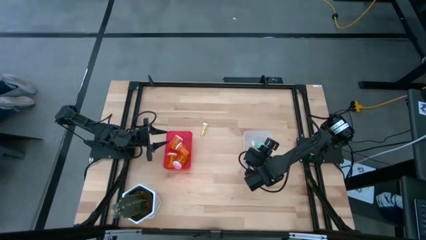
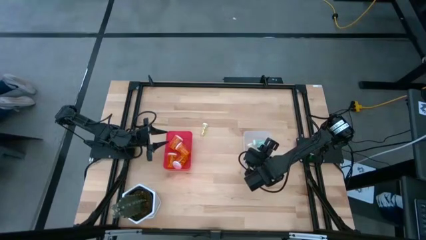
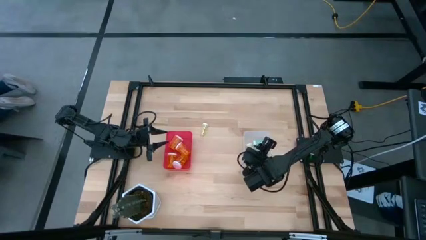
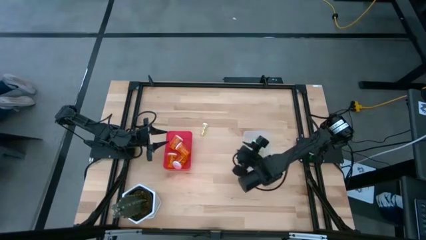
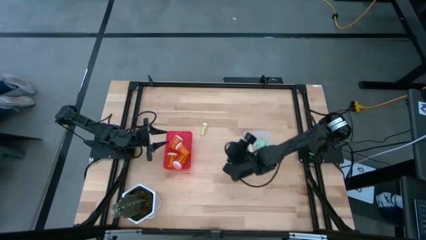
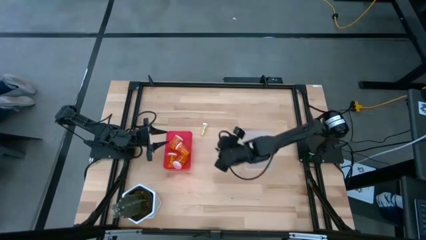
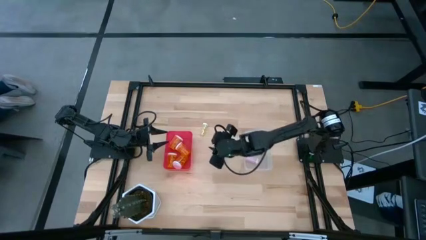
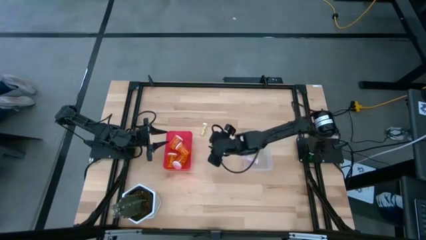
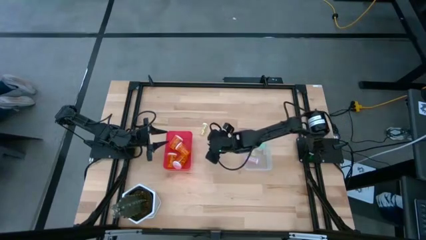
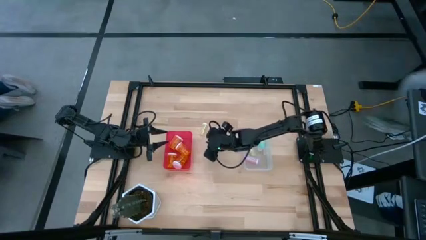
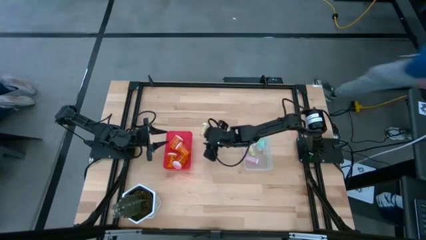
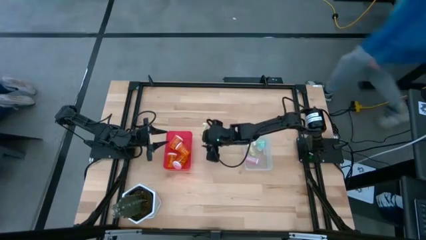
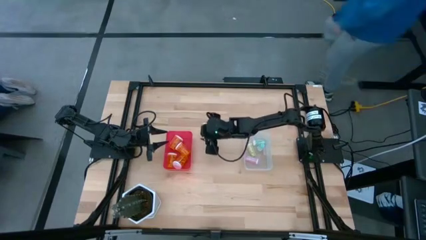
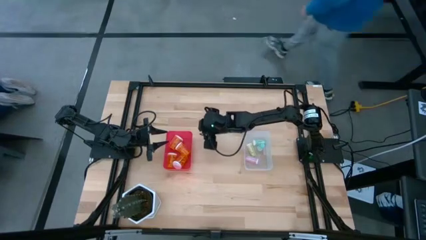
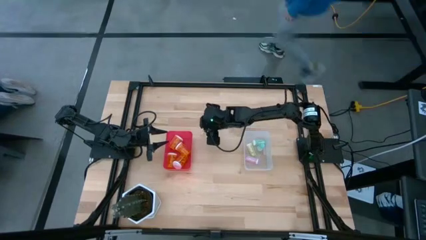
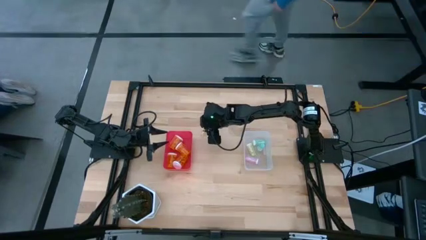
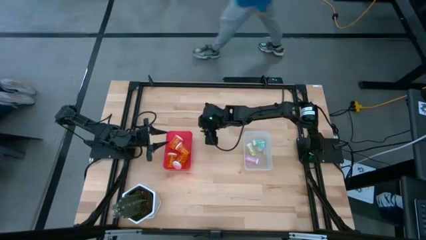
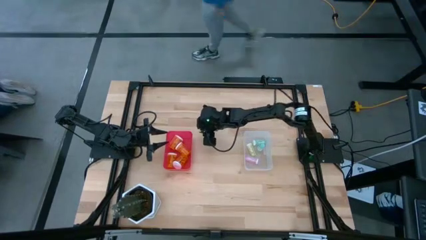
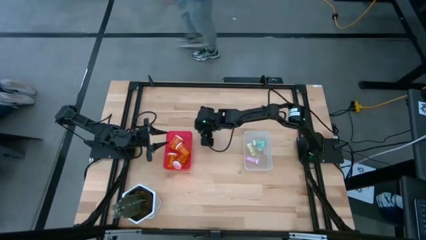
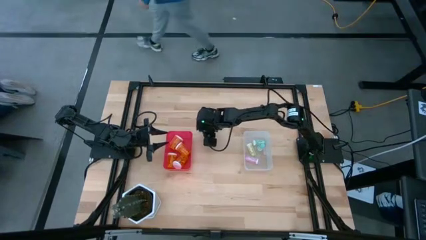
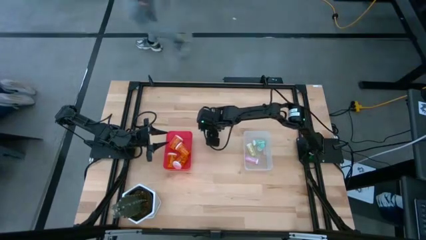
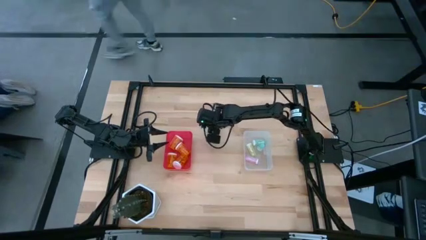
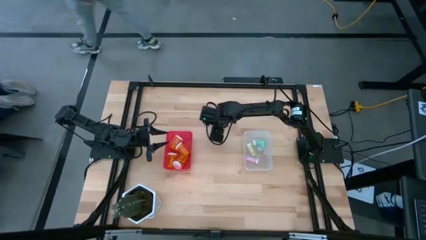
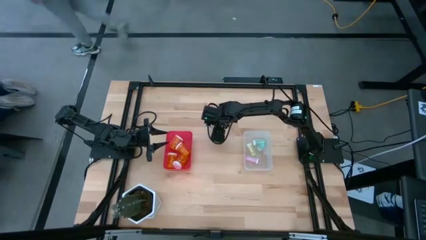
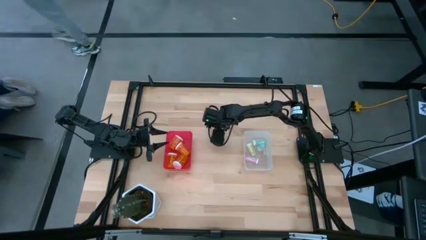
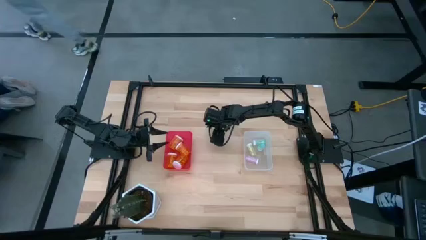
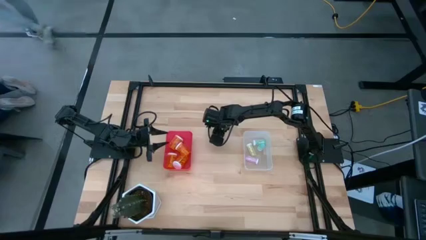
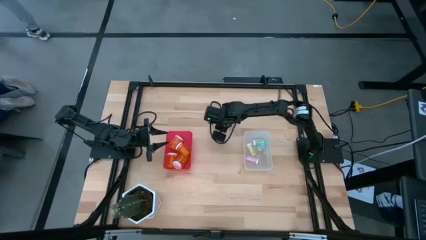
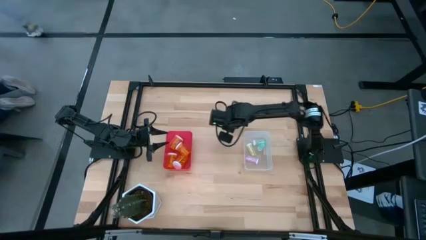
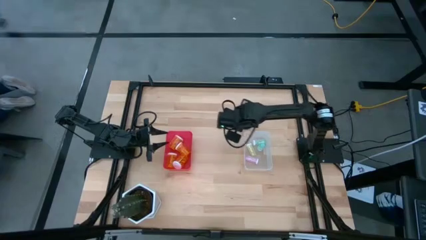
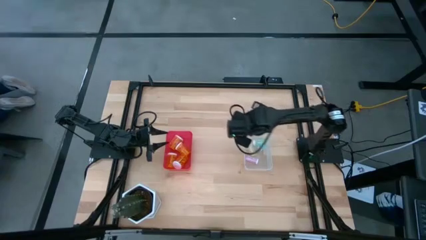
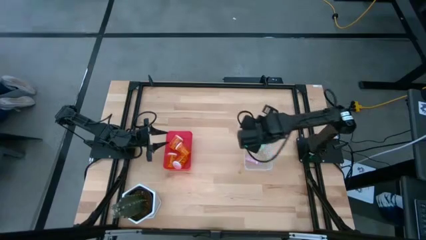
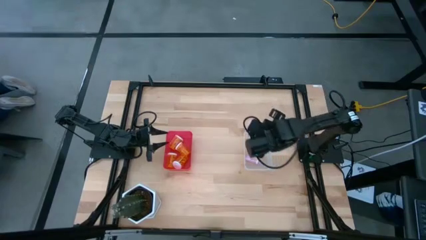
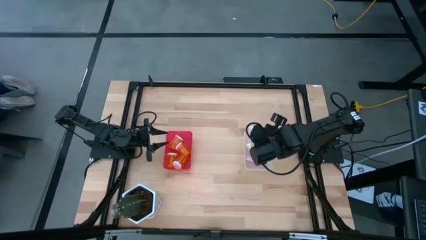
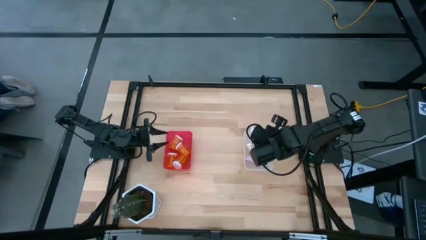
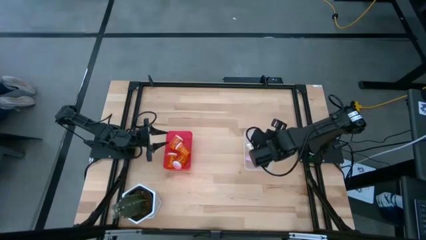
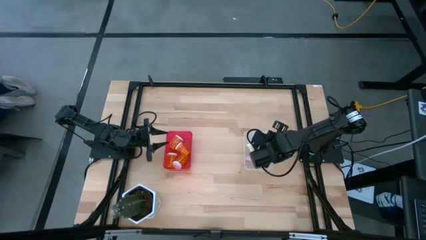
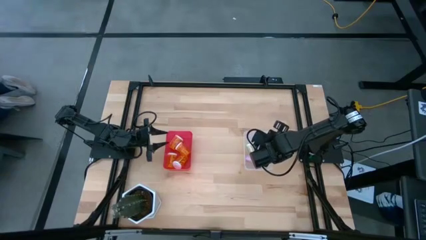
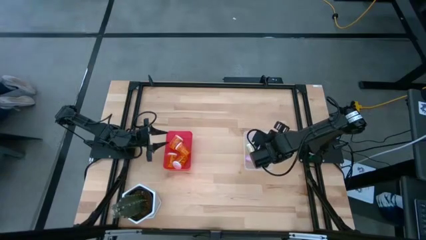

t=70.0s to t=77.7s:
Task: Pick and place medicine bottles into bin by pill shape (circle, oval)
Put the small yellow pill bottle into the transparent bin

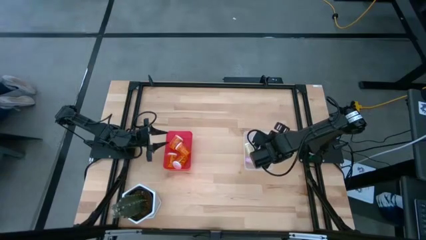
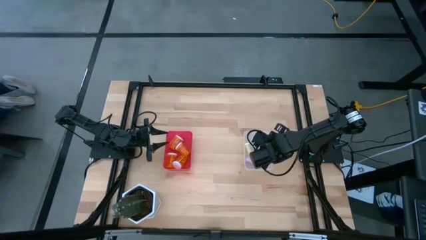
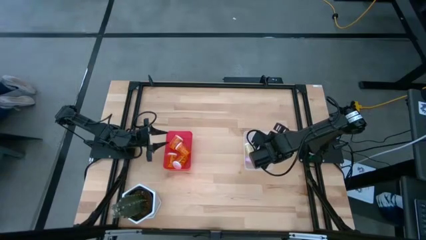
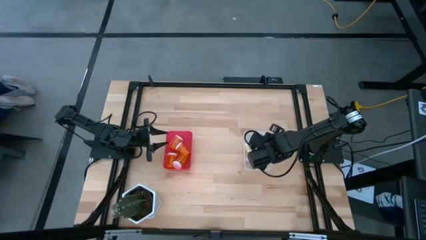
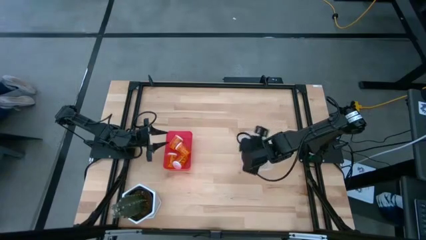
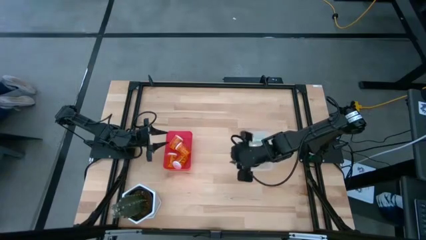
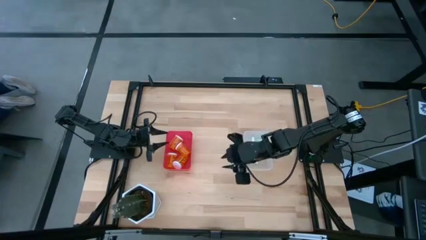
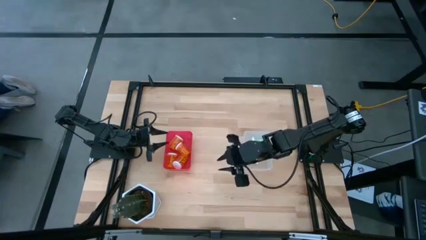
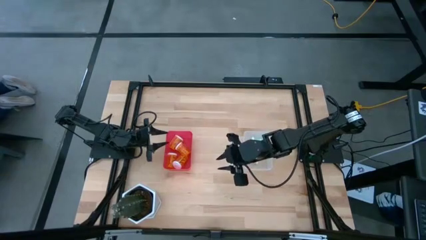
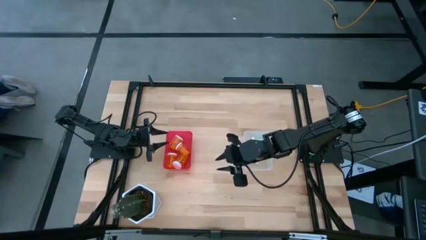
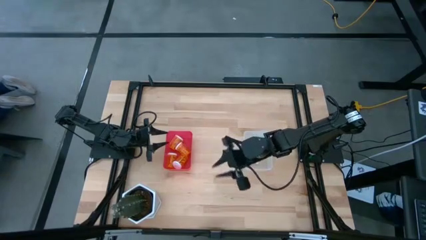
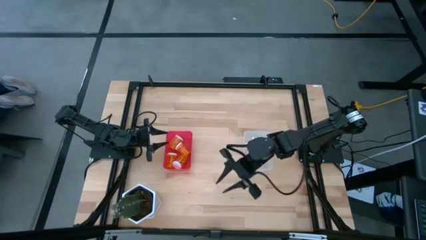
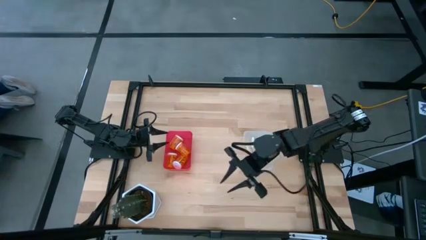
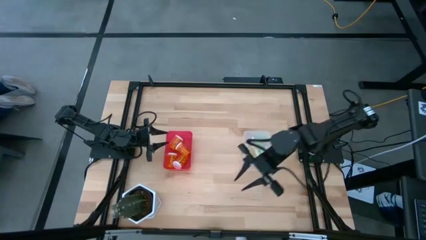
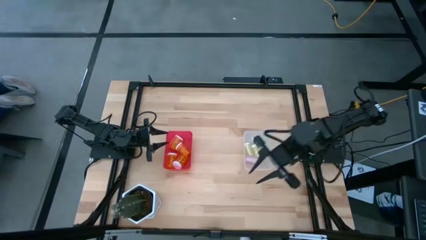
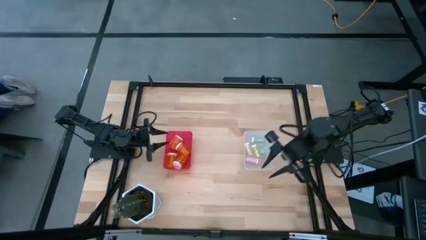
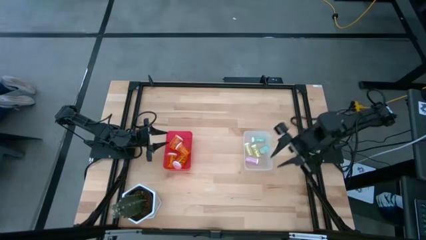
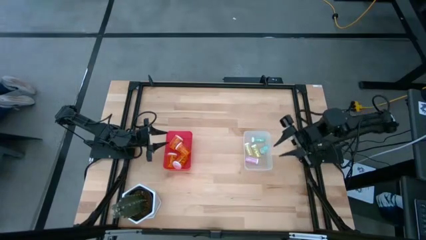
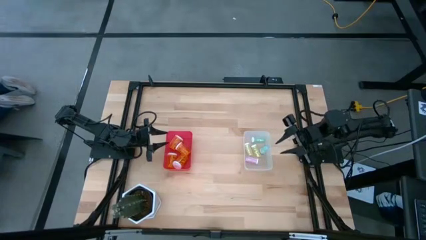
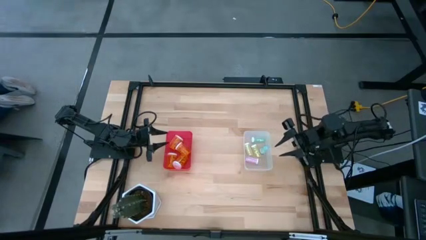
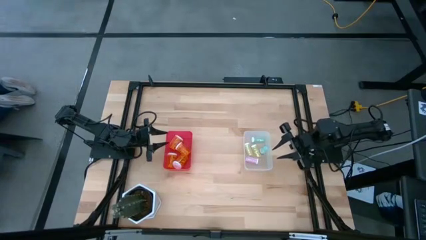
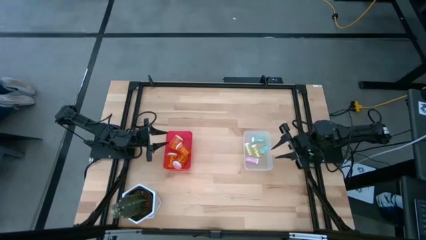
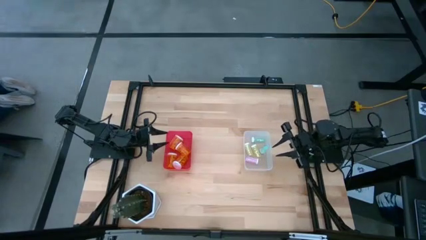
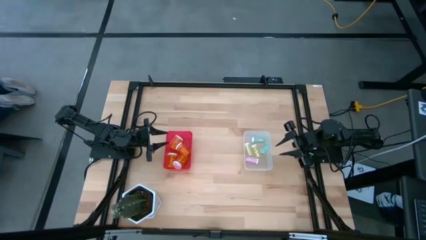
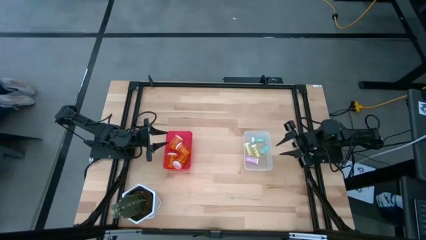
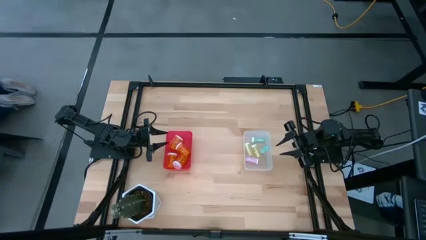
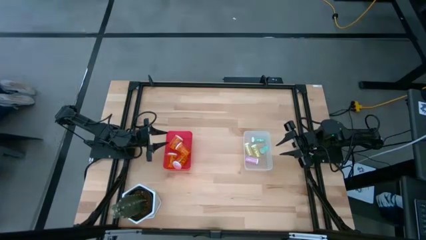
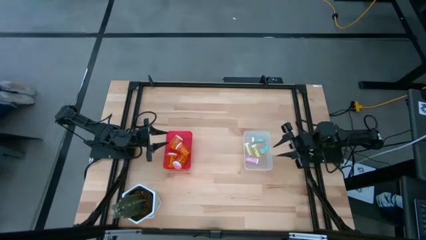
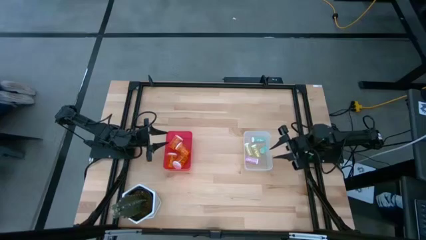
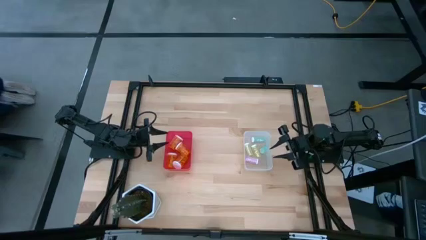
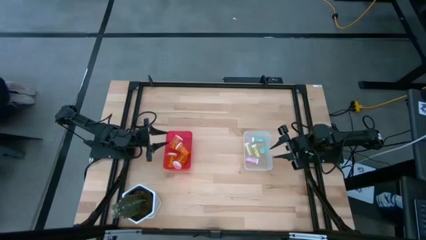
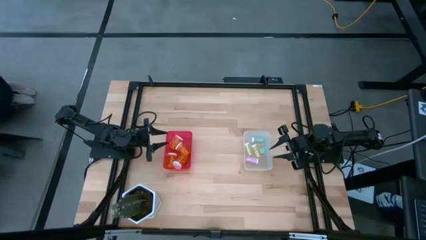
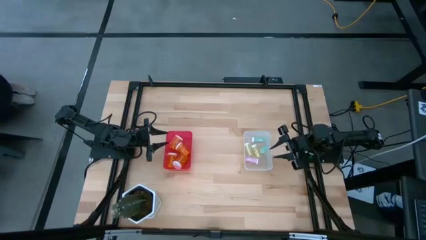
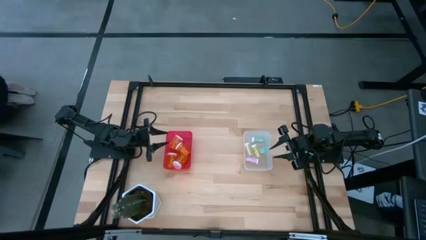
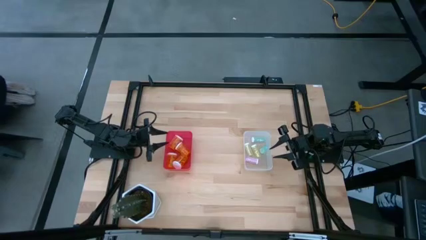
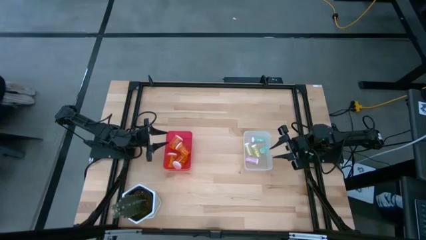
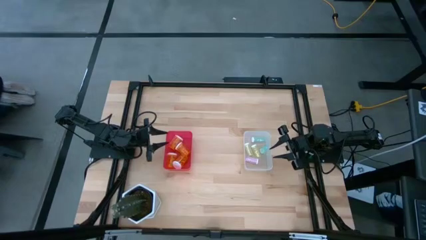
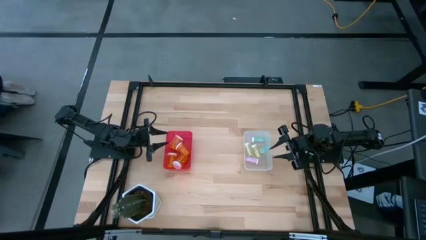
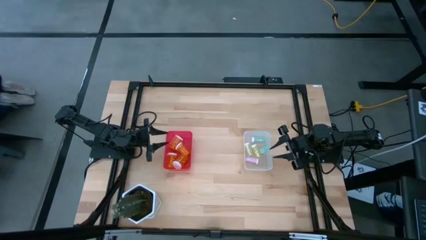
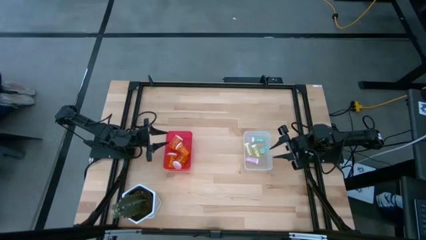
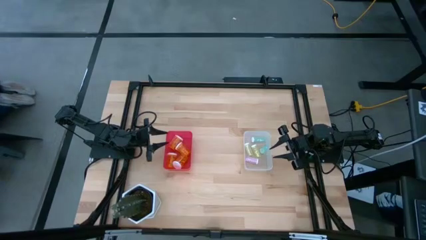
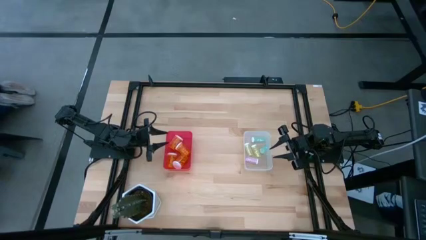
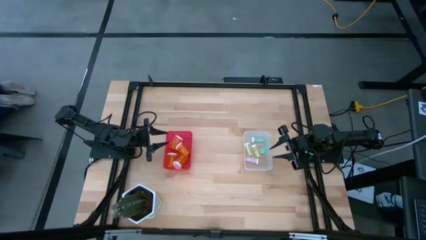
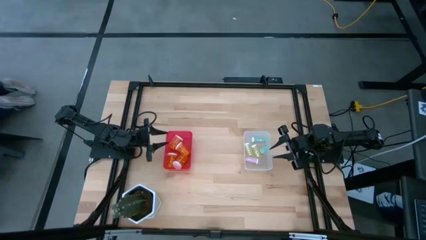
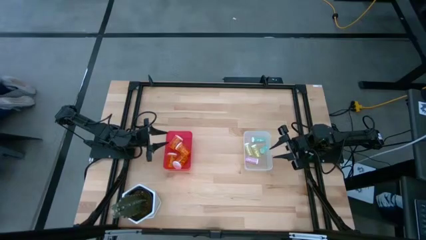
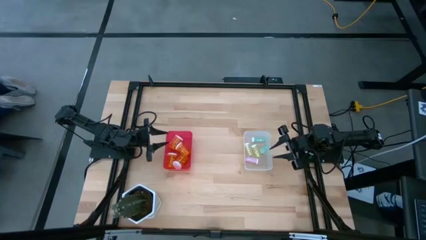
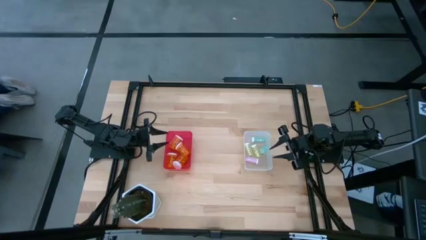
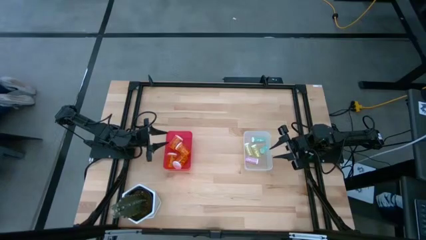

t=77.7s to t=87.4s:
Return to Home Position
